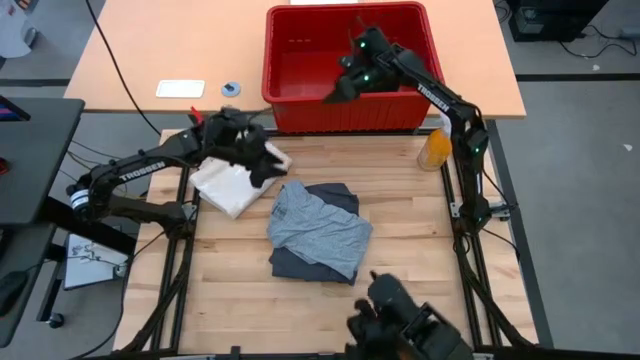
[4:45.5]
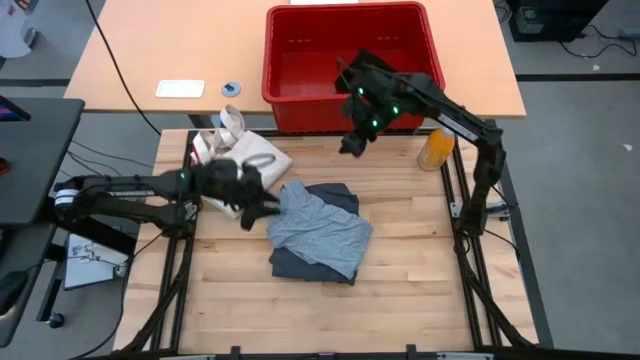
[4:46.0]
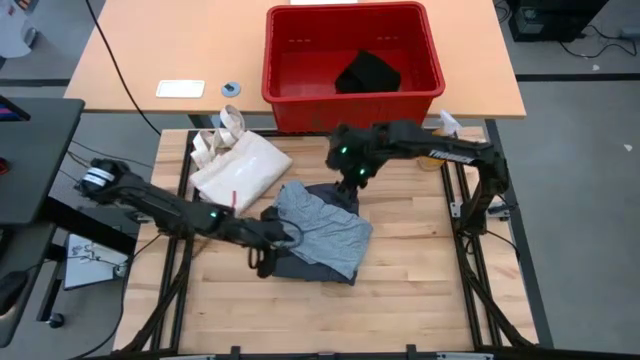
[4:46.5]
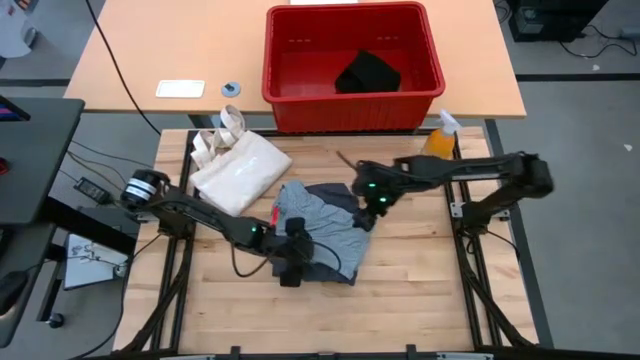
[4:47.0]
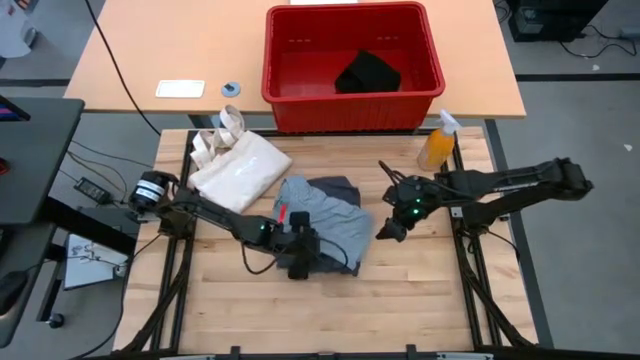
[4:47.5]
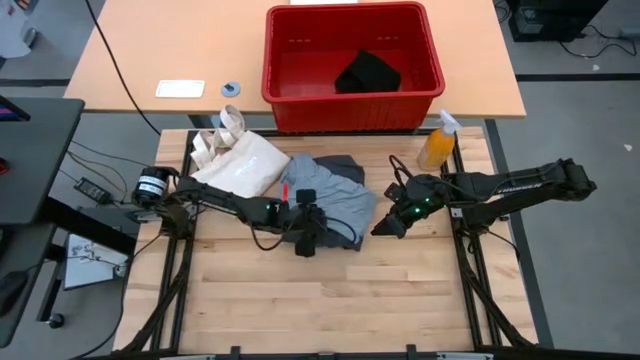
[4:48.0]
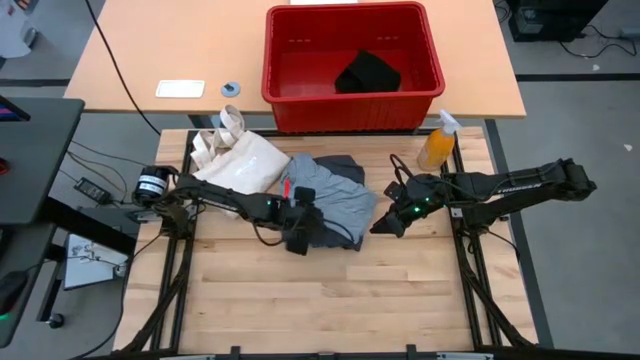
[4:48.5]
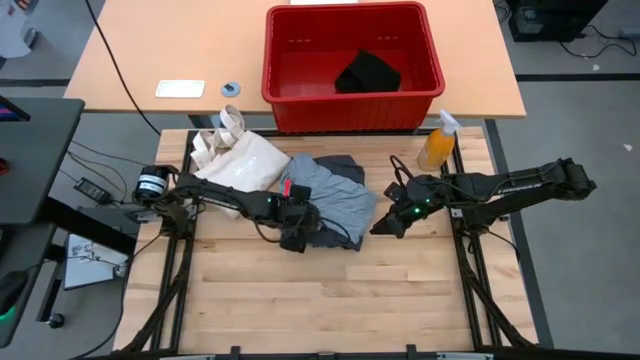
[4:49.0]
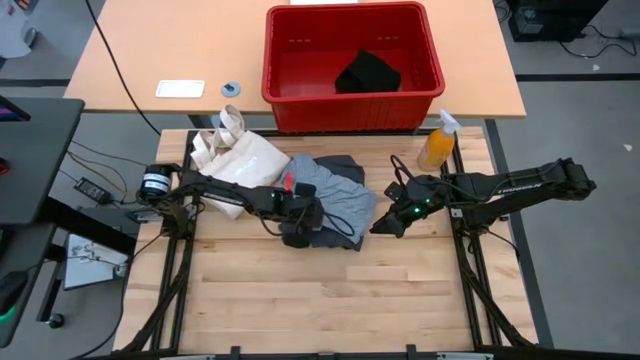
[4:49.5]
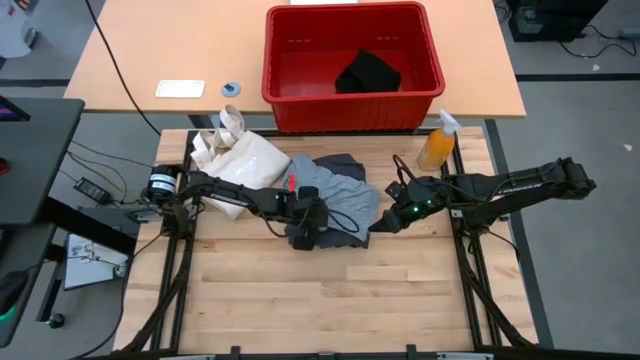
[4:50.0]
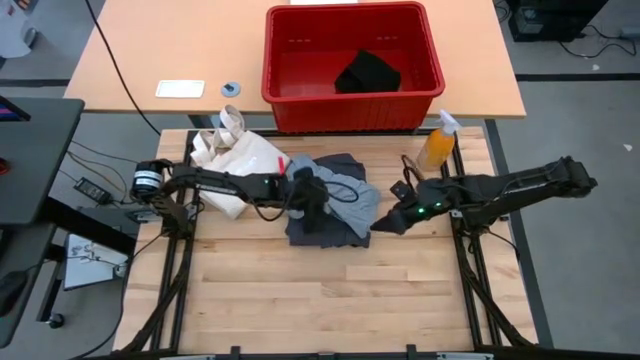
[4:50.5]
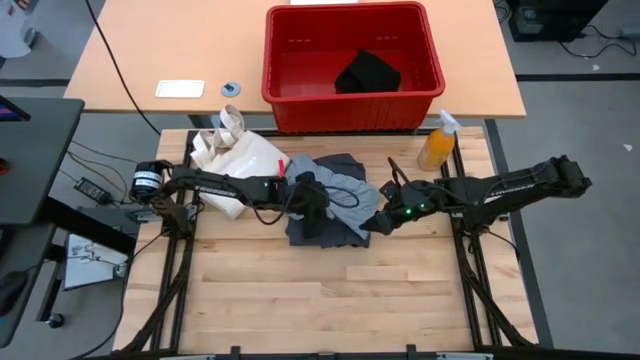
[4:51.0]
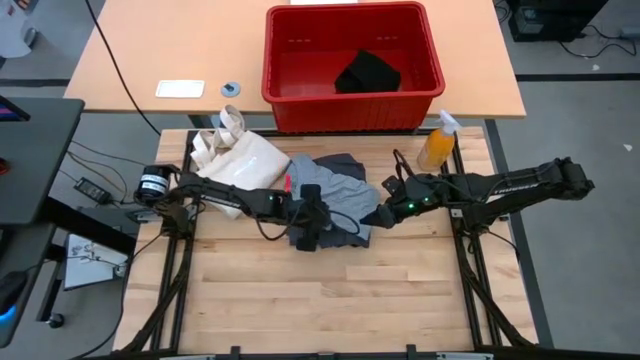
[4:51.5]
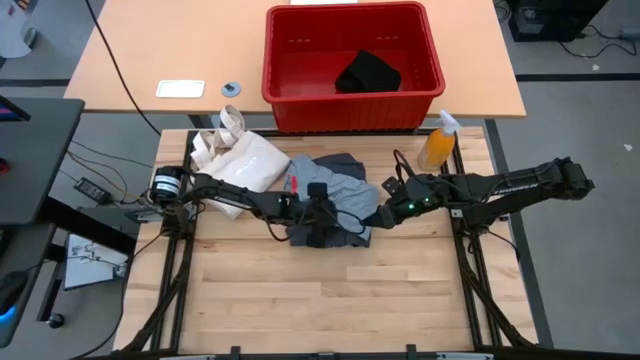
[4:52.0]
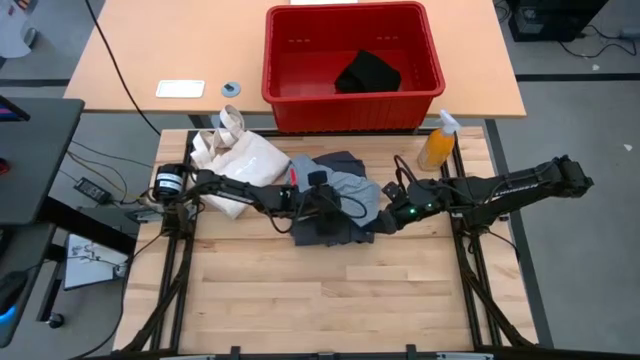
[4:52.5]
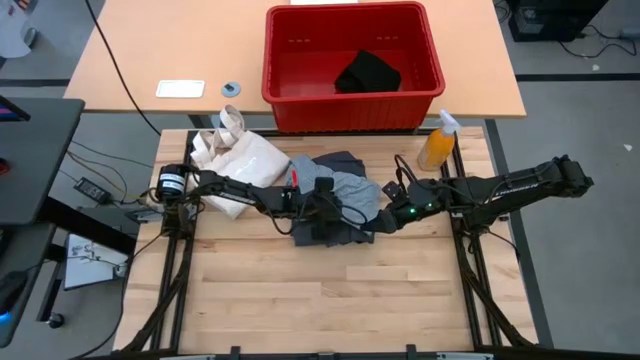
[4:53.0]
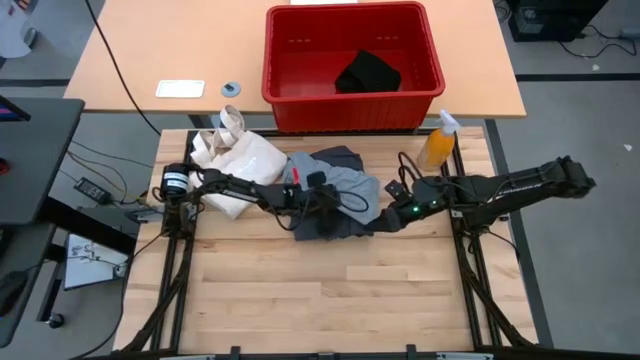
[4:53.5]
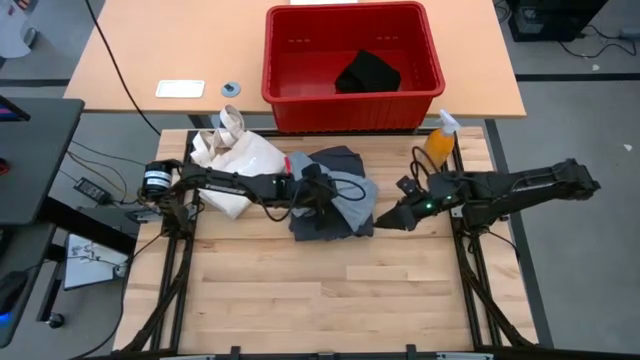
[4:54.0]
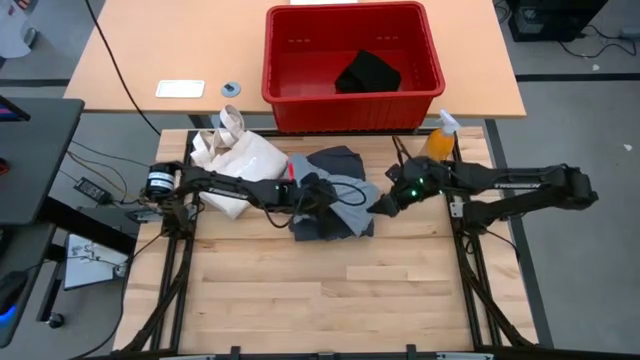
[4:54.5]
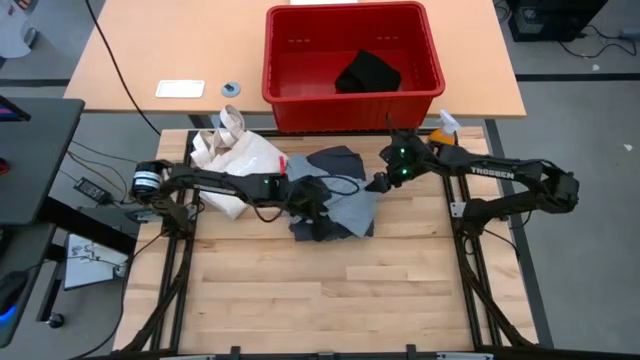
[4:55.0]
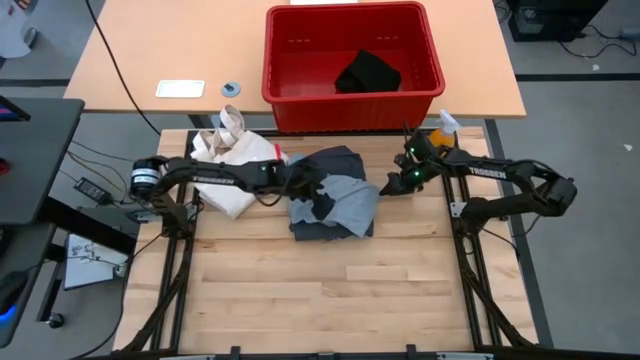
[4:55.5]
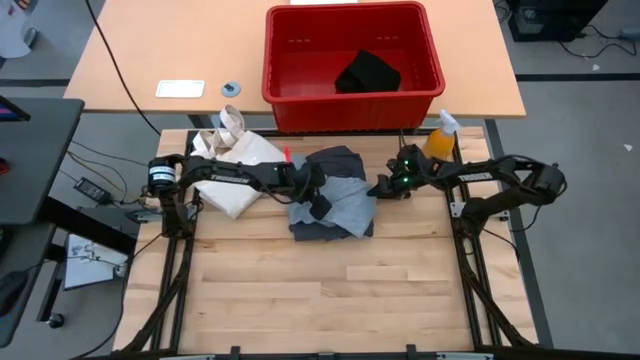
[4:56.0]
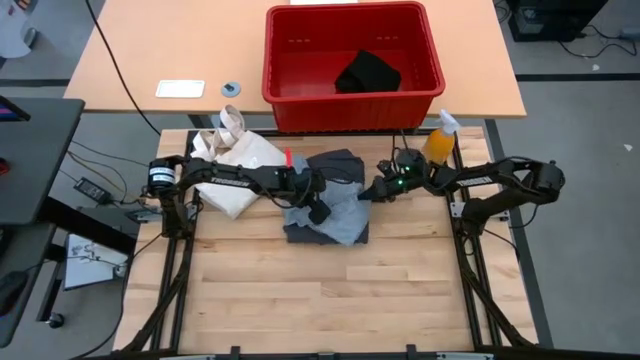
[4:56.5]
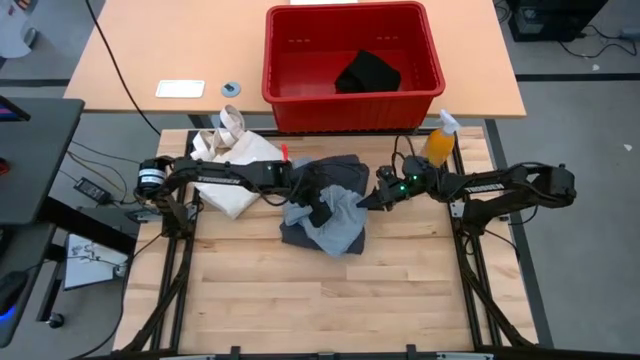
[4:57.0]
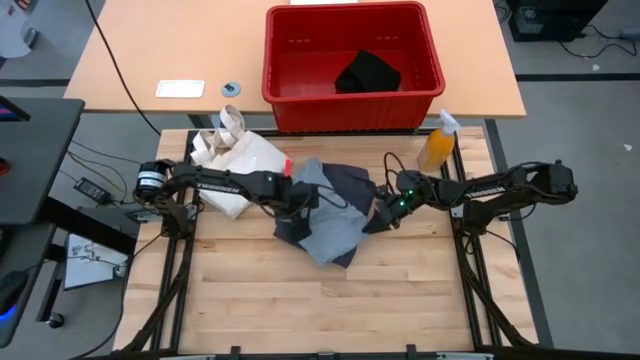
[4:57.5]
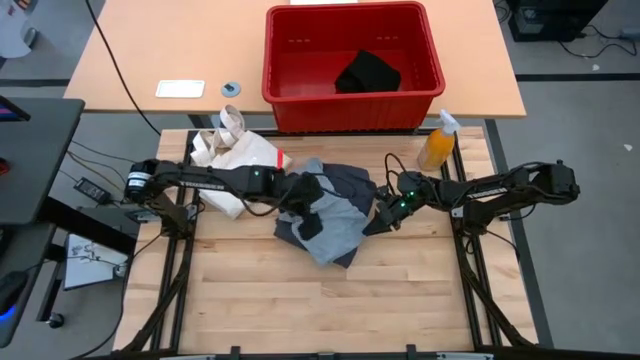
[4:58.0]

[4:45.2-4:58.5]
Task: Fold Laundry from Bin
Put the light gray t-shirt into the red organizer bin

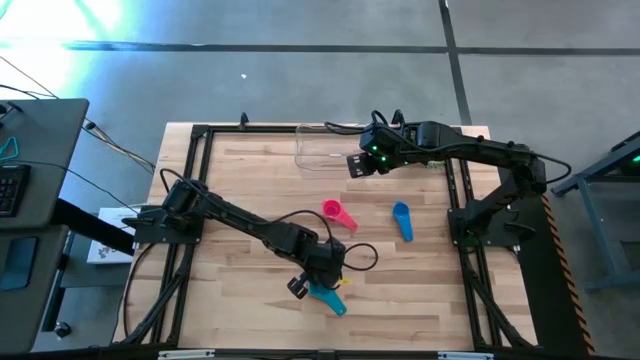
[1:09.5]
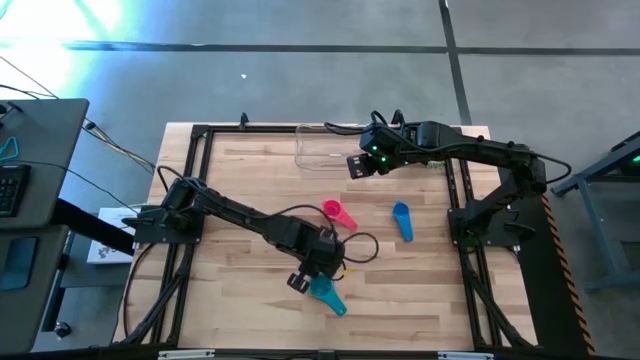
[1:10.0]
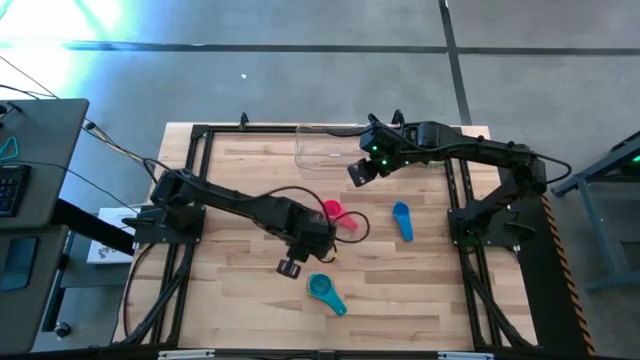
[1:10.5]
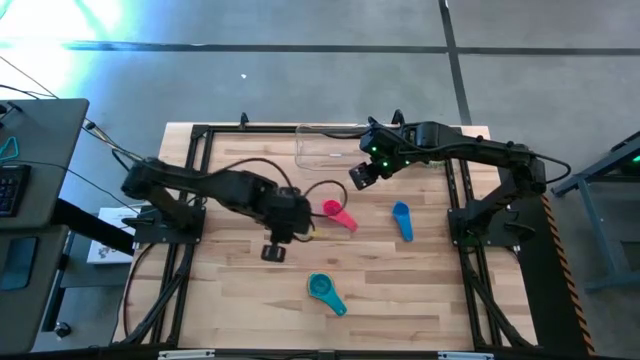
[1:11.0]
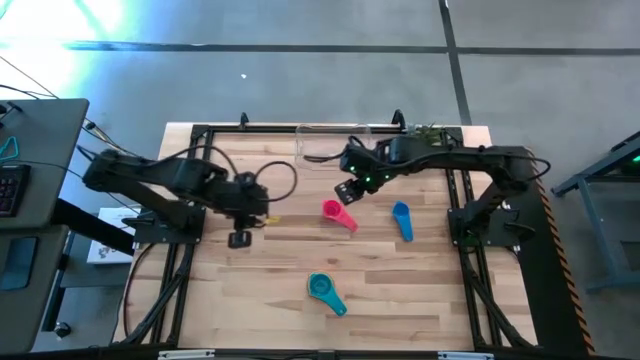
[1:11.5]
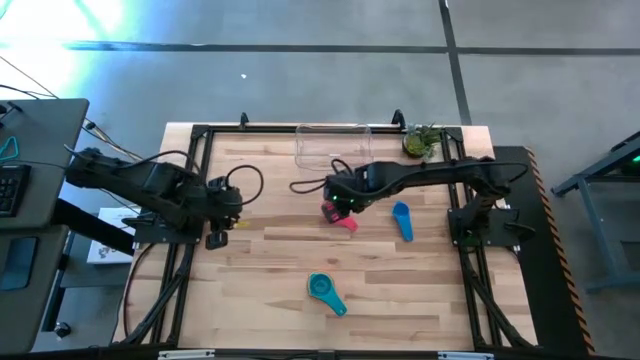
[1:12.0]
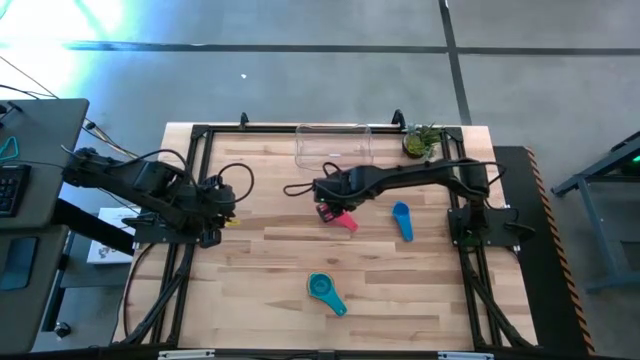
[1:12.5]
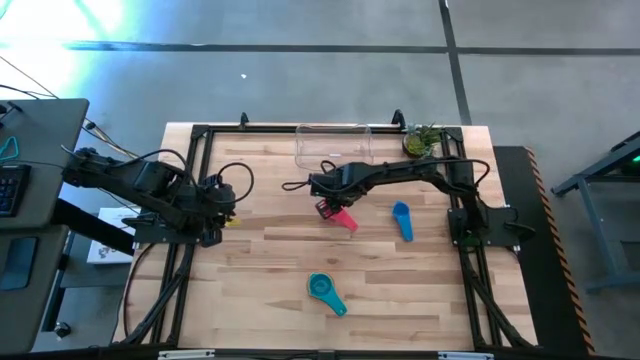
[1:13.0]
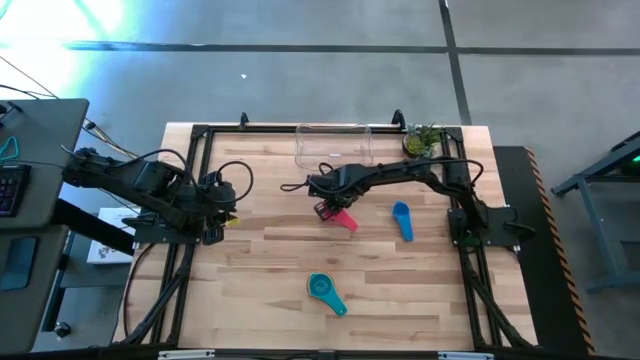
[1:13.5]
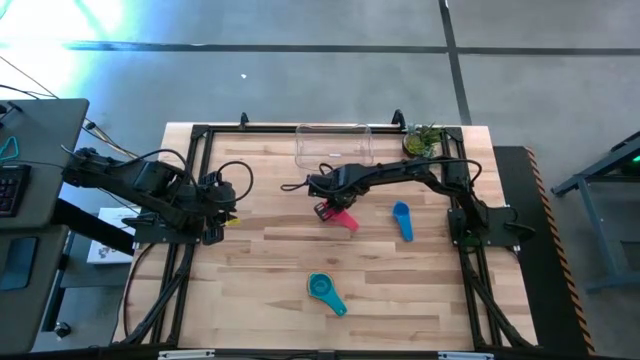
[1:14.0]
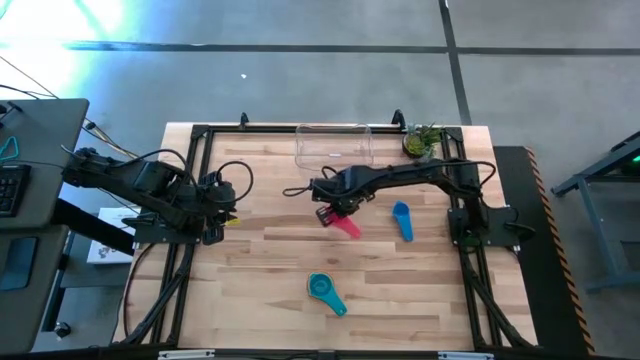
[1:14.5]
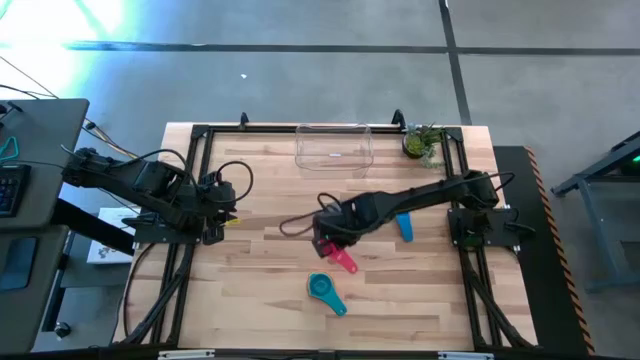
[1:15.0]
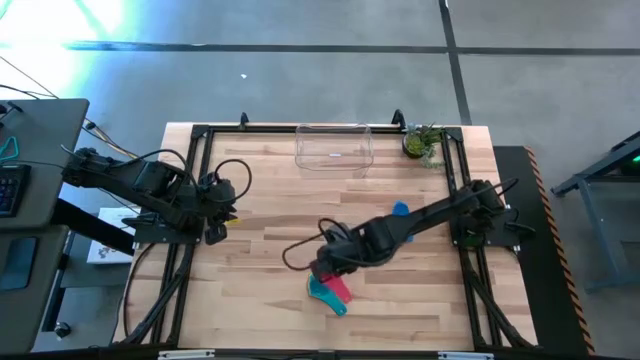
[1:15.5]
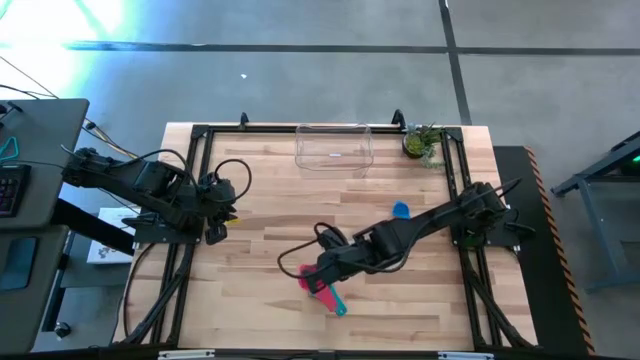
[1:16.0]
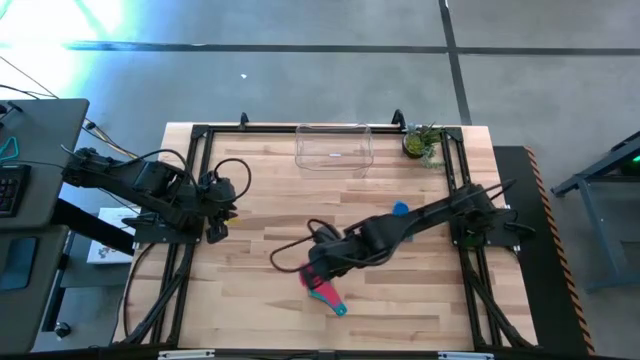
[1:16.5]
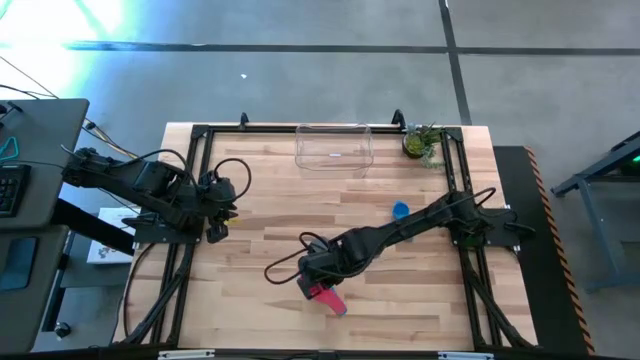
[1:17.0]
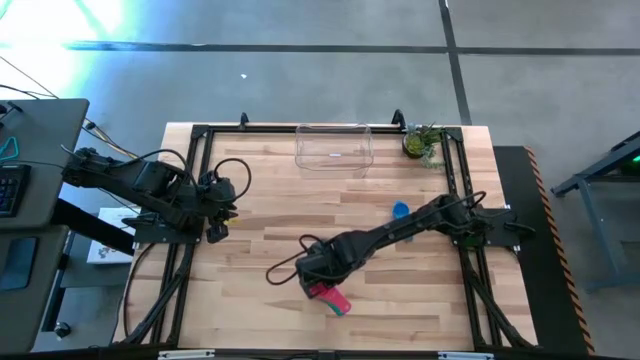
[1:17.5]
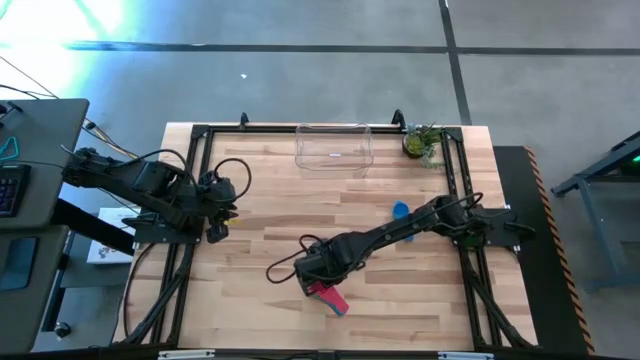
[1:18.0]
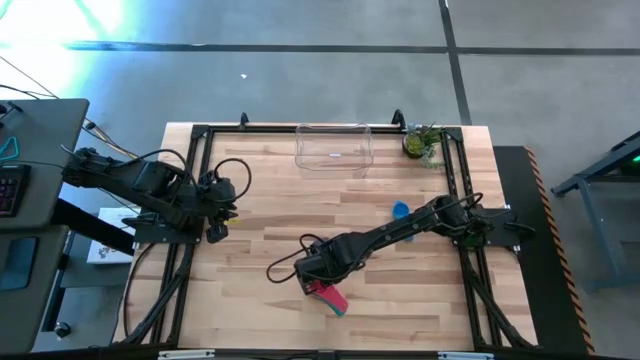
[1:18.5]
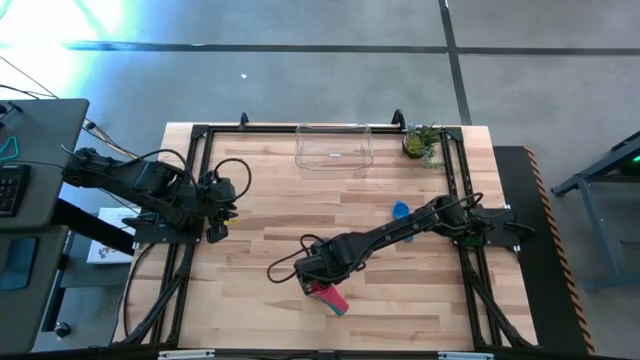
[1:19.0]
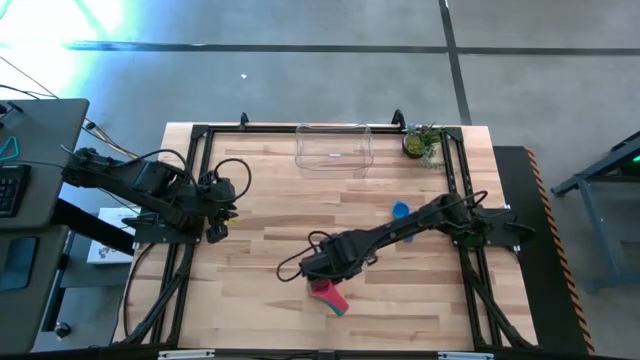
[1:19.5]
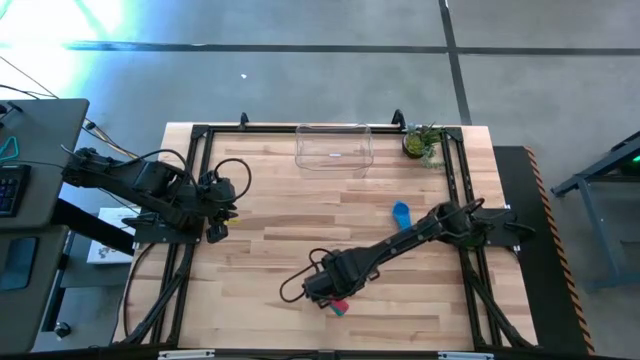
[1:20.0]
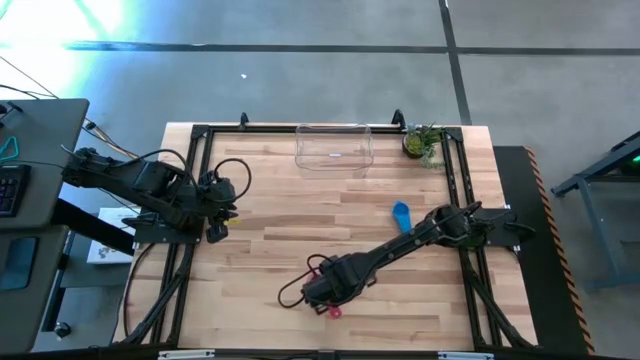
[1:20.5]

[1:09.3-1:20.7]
Task: Nest measuring cups in basket
Stack the pink measuring cup on the light blue measuring cup
